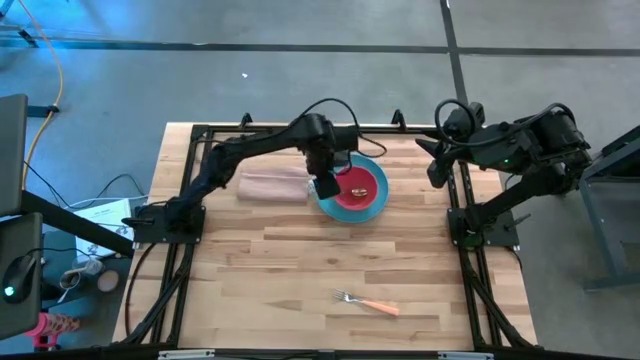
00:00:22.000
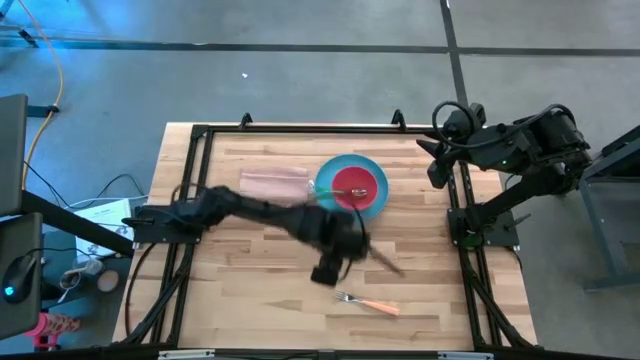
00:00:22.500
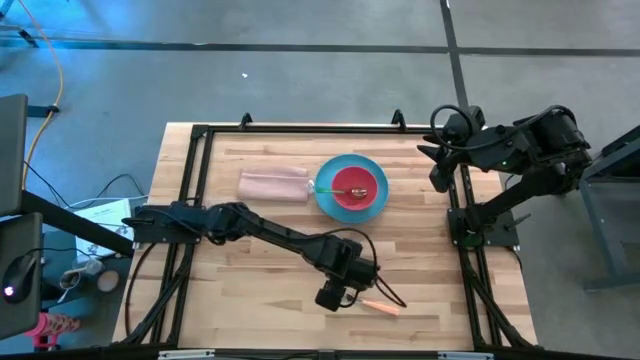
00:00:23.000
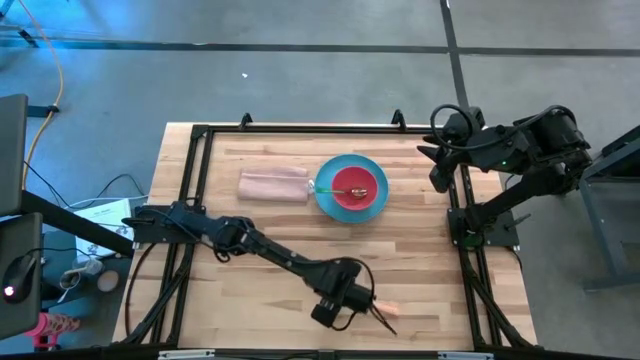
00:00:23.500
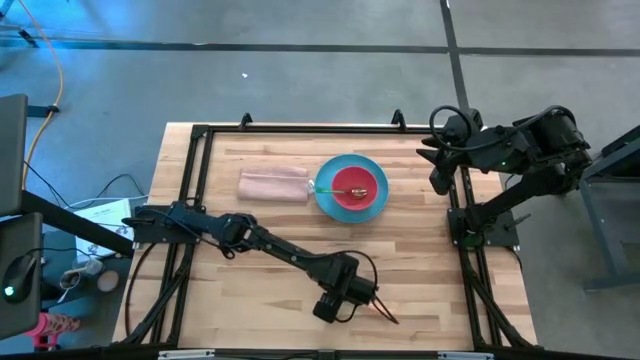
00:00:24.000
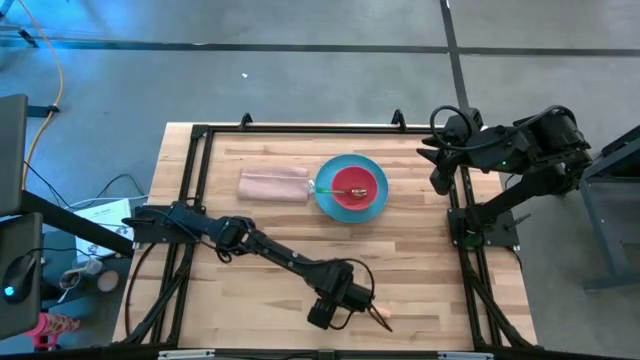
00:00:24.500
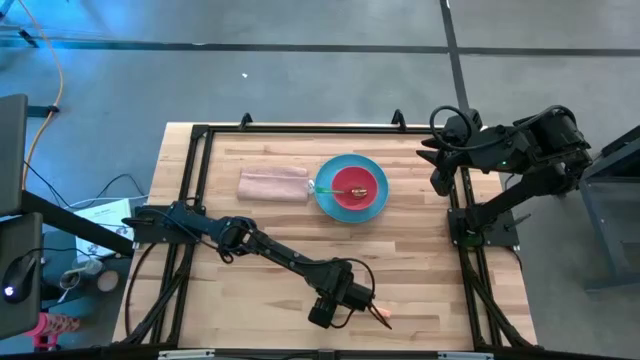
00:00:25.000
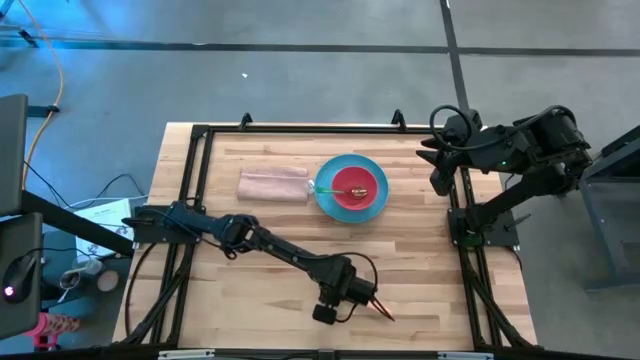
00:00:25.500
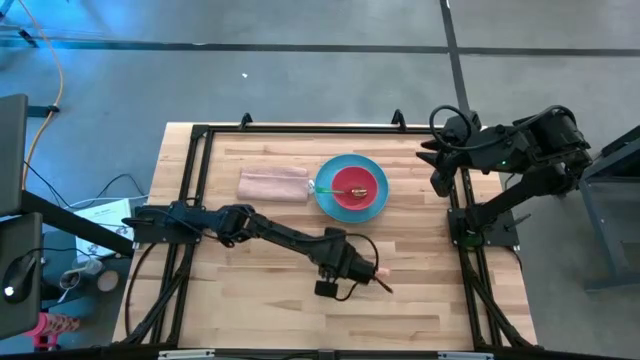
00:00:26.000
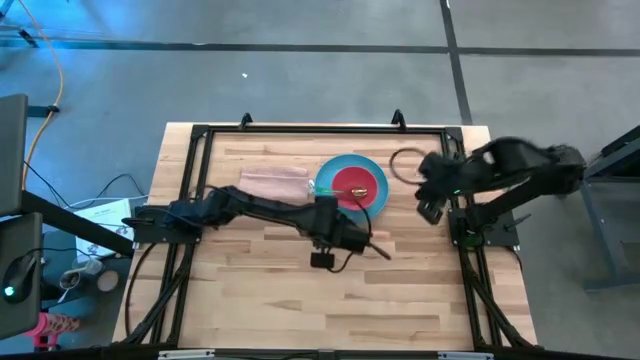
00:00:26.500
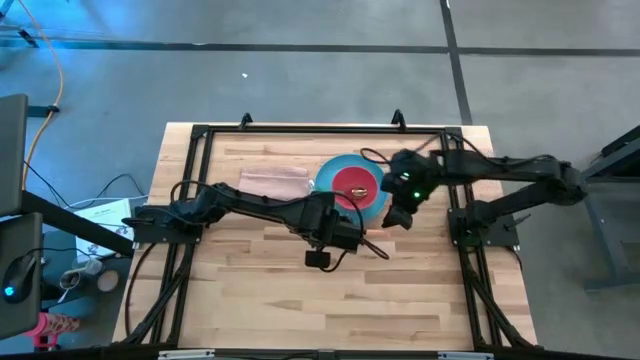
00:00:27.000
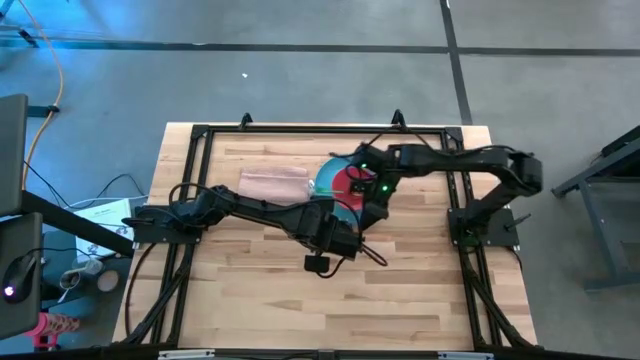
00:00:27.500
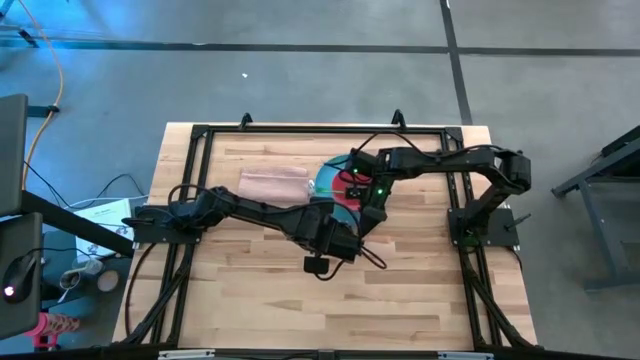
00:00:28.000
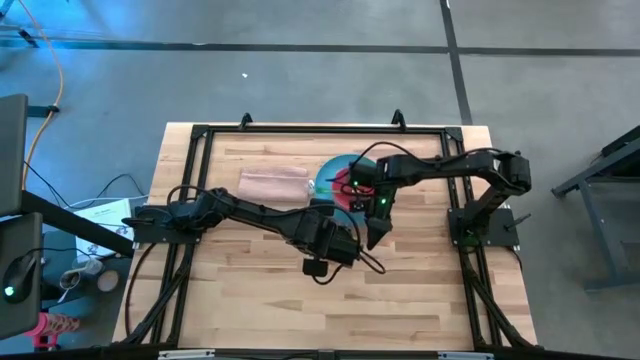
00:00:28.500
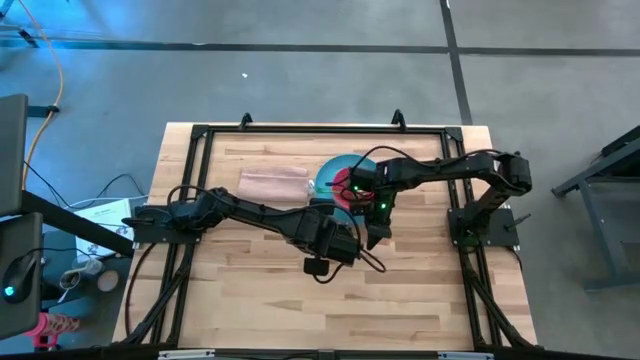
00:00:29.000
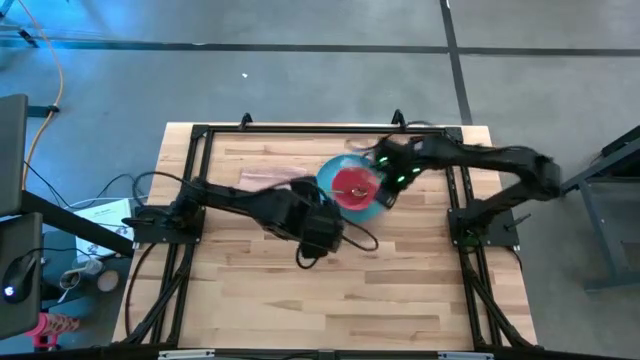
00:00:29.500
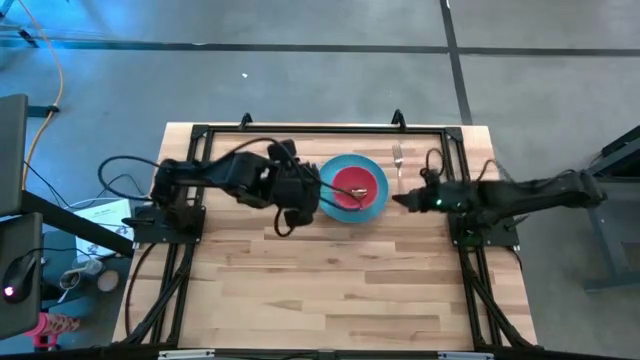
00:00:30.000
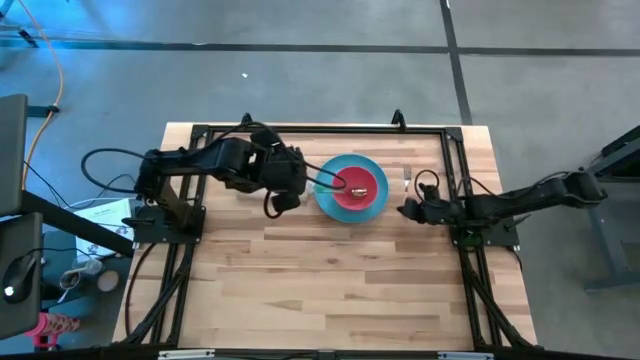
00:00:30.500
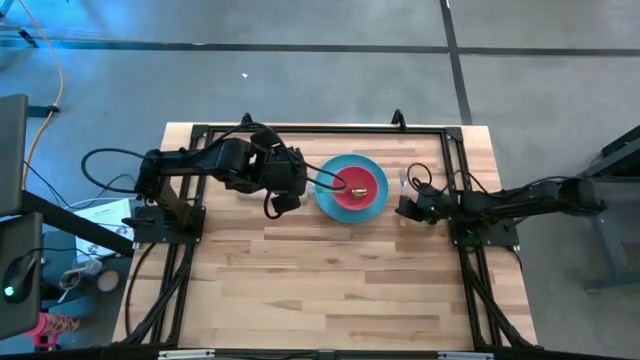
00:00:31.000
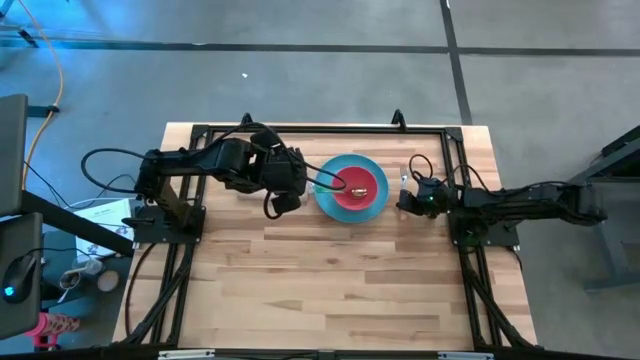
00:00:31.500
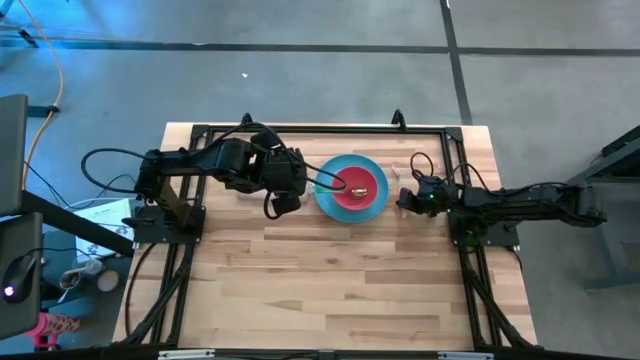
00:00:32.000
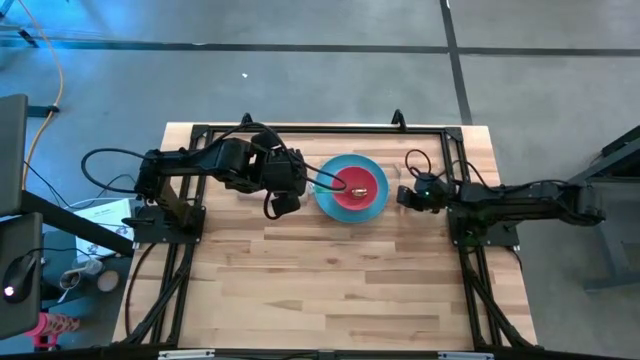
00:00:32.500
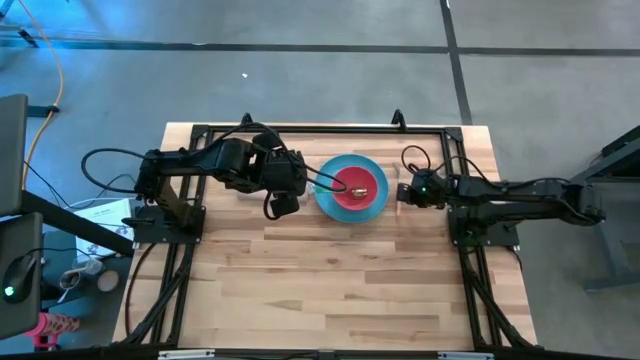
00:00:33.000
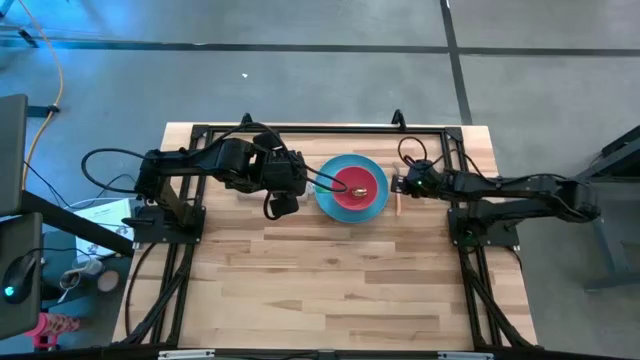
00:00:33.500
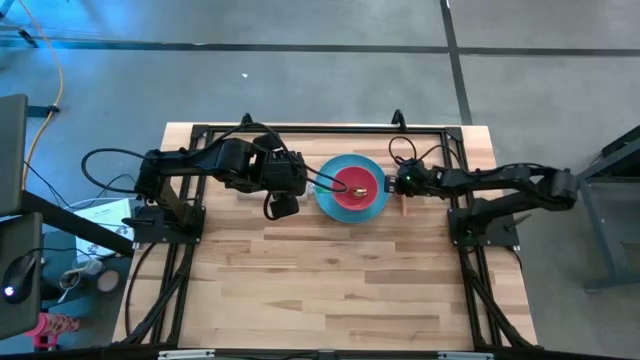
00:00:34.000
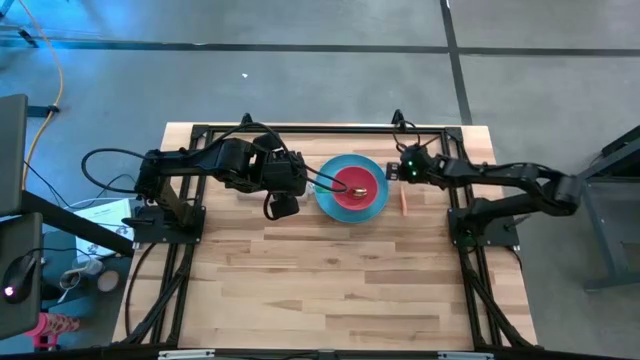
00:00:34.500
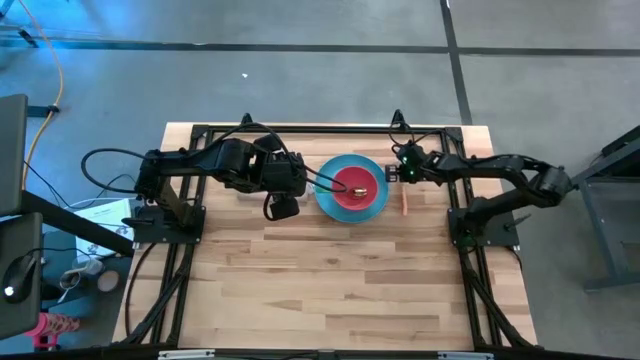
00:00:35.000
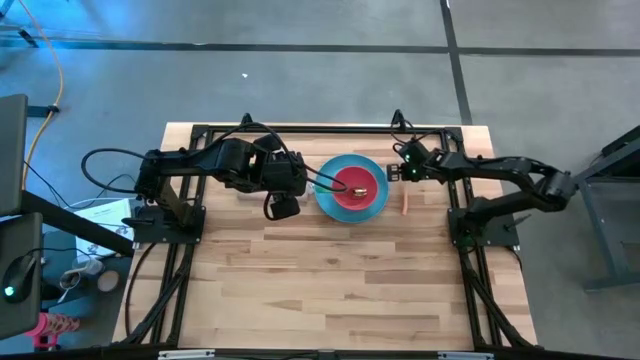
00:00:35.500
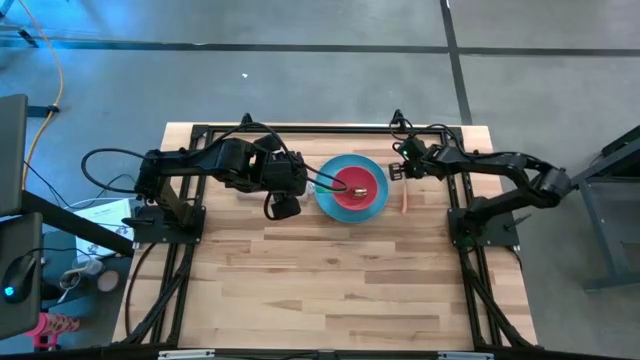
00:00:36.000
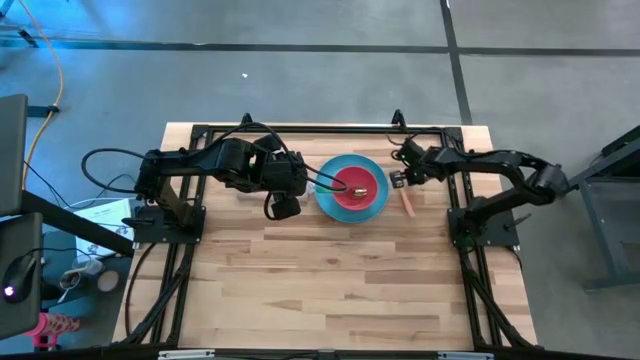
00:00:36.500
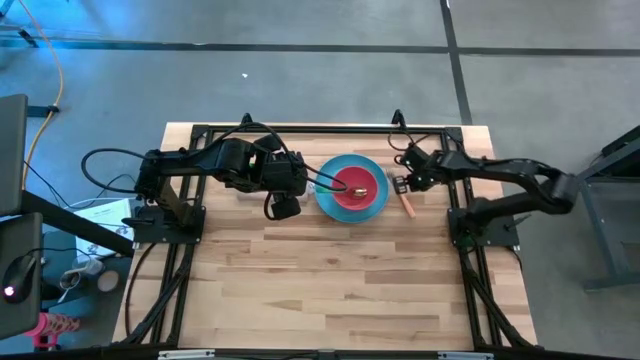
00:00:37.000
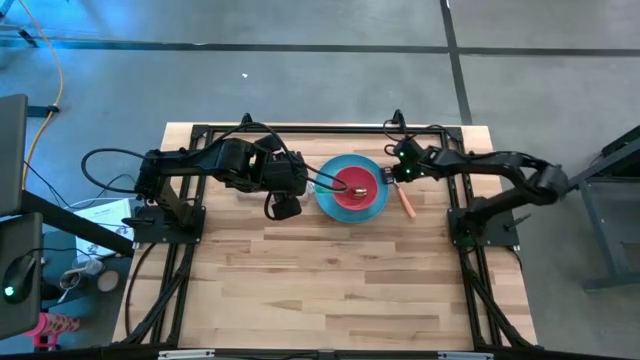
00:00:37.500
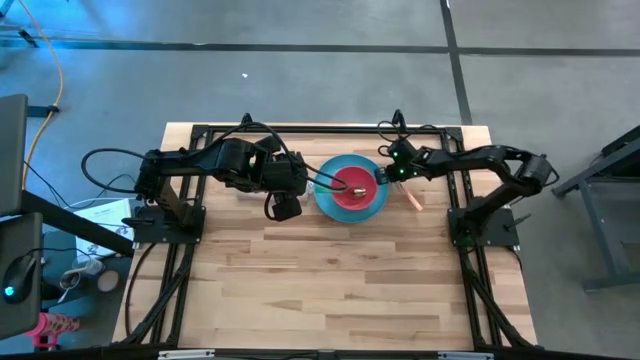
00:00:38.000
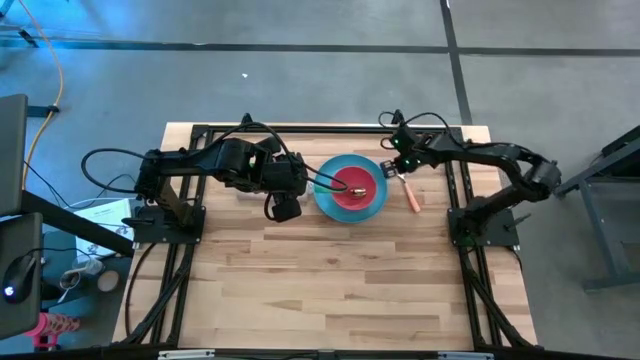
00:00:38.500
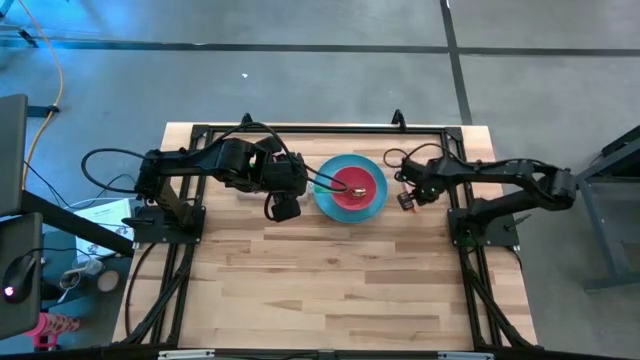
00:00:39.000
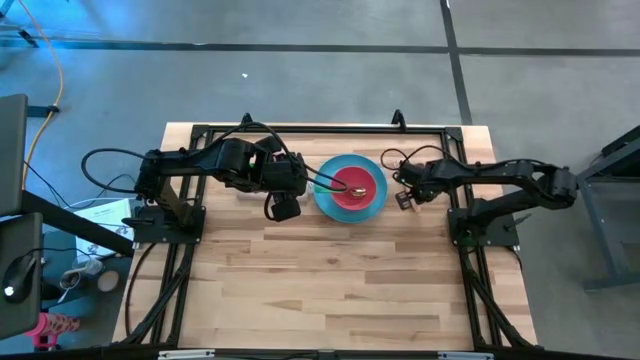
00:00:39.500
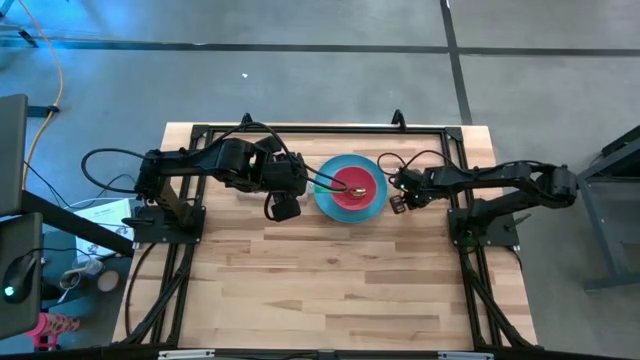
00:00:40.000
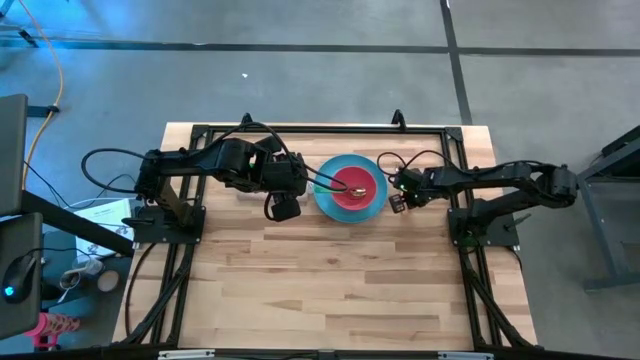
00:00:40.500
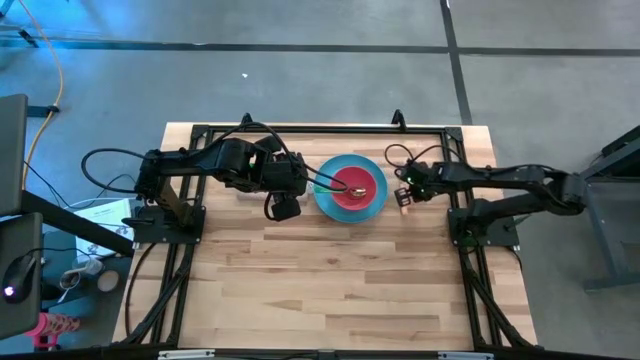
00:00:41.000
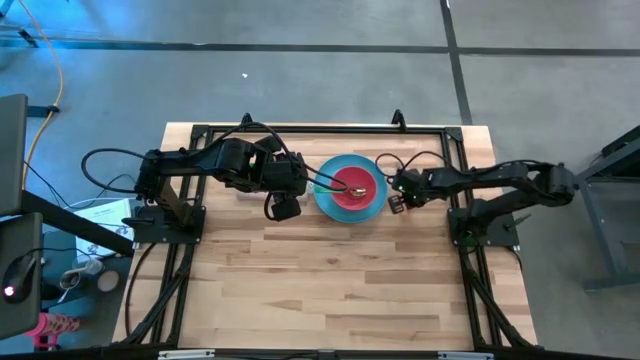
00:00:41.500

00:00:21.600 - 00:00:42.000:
Task: Set table place
Put the orange fork beside the blue plate
